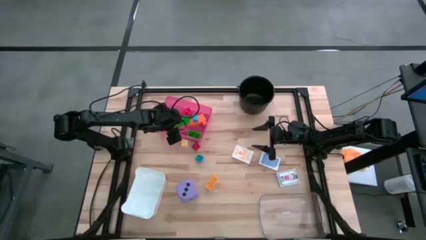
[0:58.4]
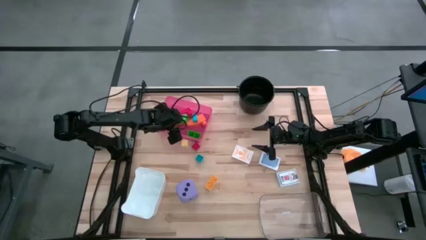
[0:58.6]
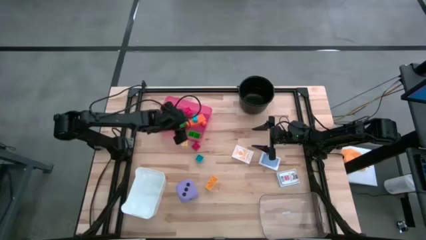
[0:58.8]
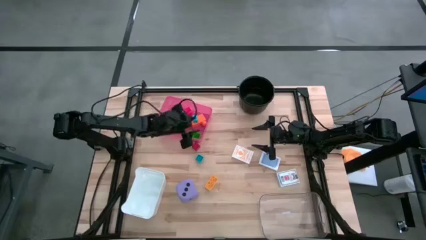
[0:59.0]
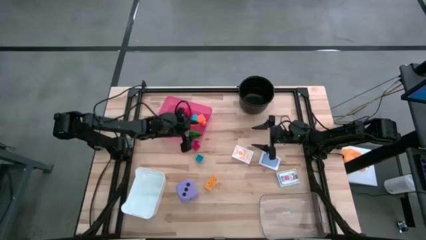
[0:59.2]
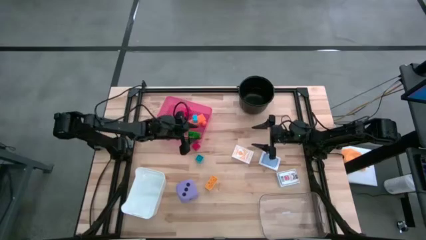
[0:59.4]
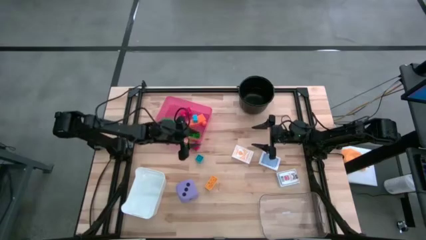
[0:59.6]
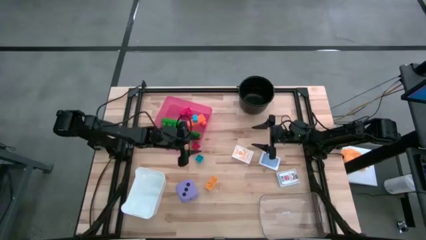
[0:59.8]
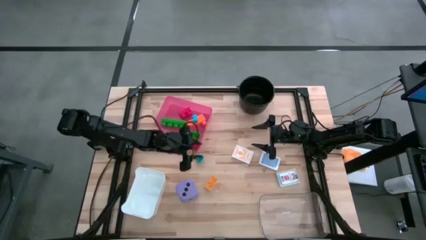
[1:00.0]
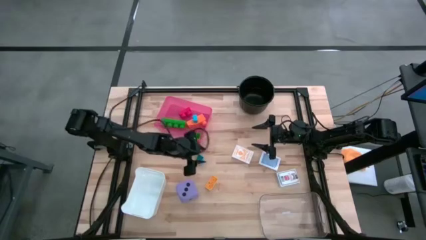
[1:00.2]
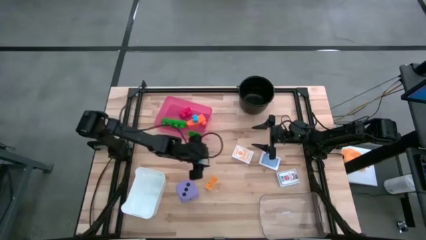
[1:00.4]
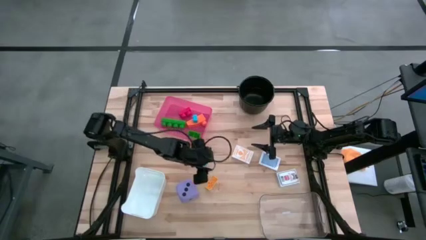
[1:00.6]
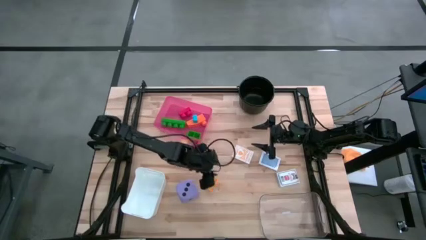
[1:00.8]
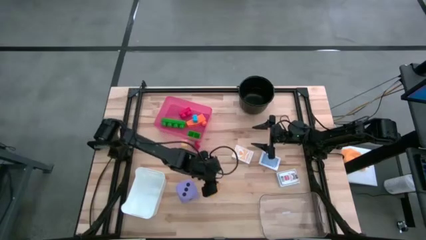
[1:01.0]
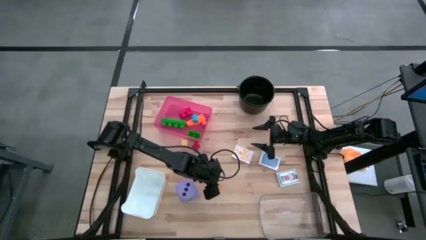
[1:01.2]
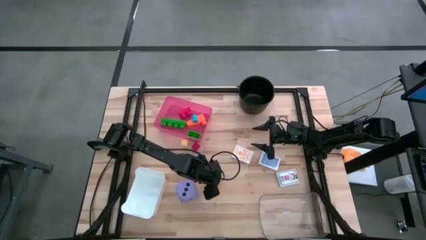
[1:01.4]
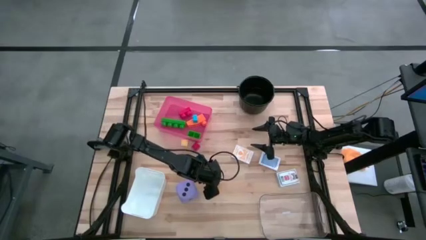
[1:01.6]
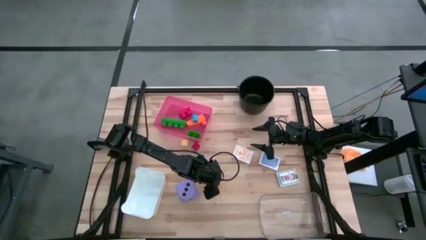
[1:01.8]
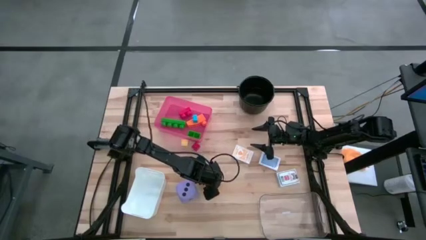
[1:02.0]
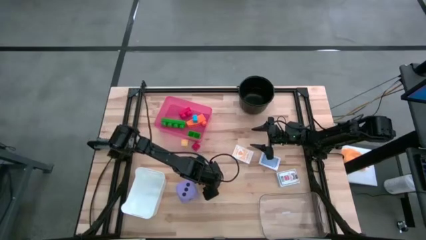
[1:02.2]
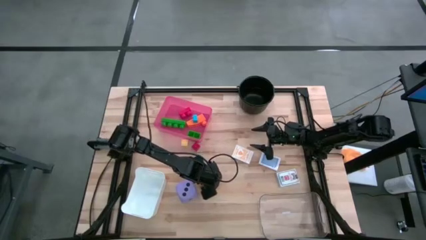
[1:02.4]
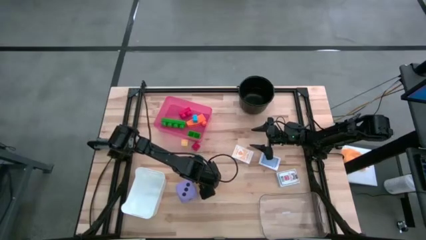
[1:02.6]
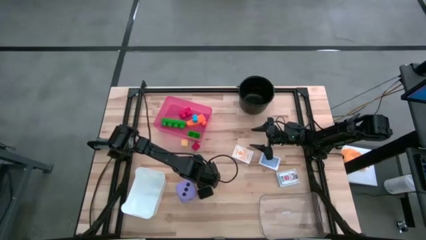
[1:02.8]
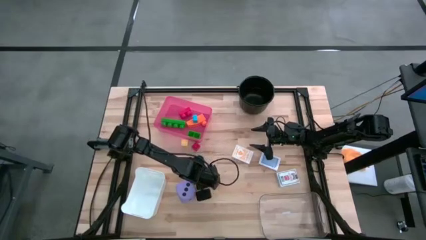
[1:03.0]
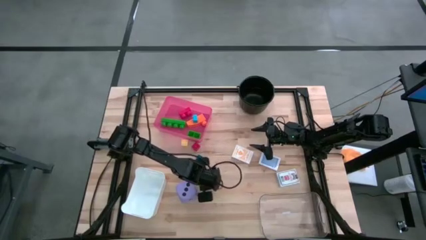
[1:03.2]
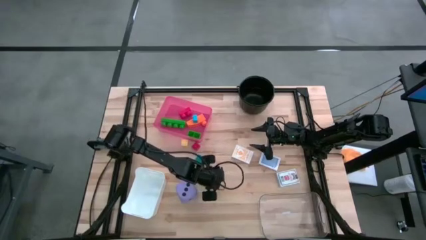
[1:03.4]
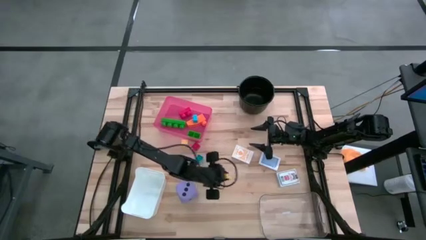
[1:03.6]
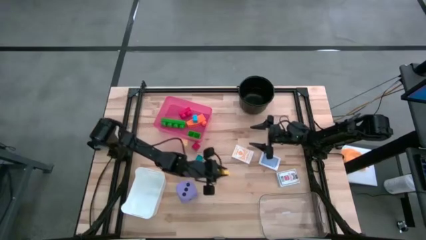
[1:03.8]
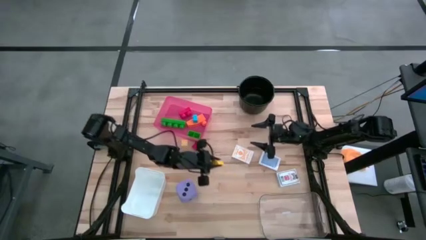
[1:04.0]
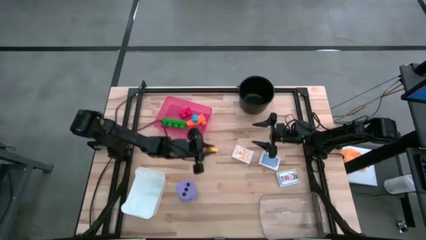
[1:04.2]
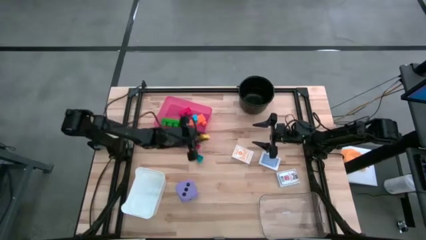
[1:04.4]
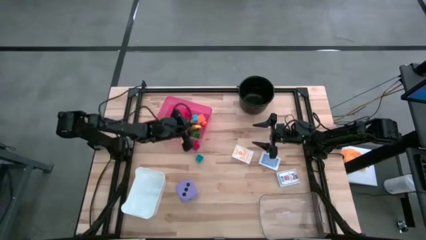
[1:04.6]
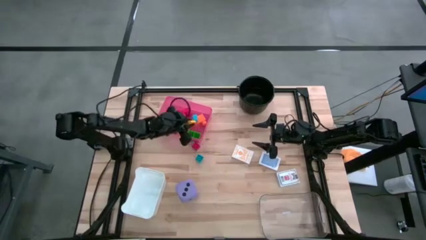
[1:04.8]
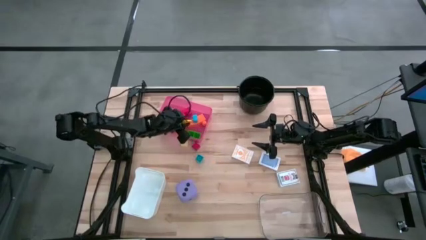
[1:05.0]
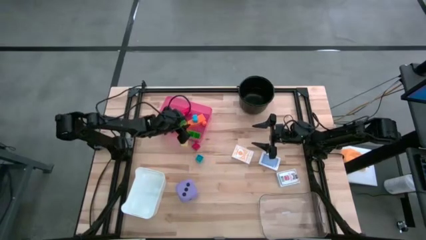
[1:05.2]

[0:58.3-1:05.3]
Task: Pick & Place Toys
Put the bottom yellow game piece into the red bin

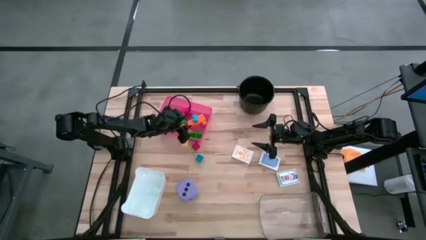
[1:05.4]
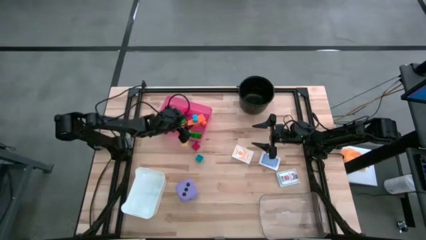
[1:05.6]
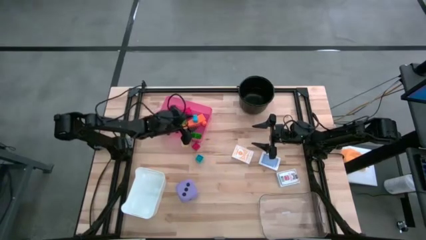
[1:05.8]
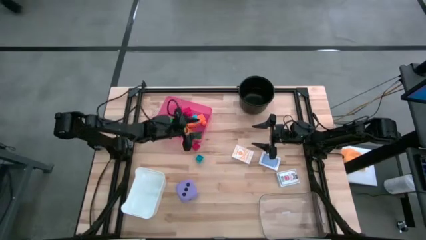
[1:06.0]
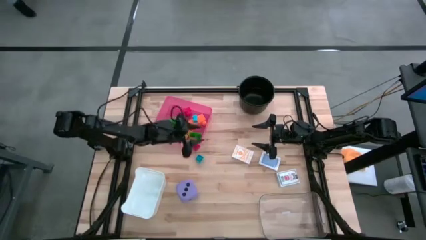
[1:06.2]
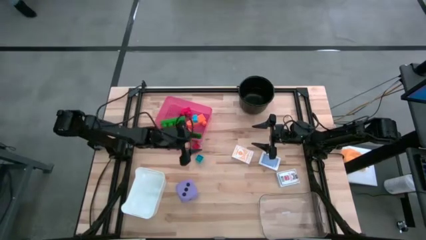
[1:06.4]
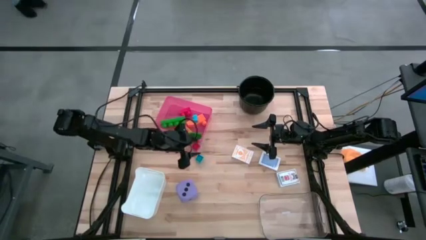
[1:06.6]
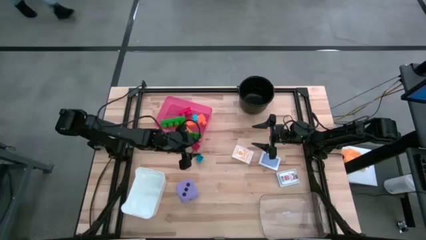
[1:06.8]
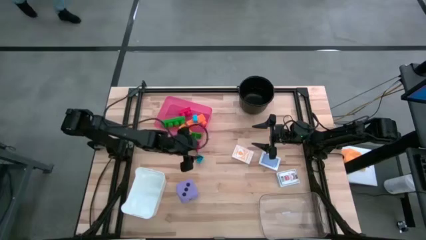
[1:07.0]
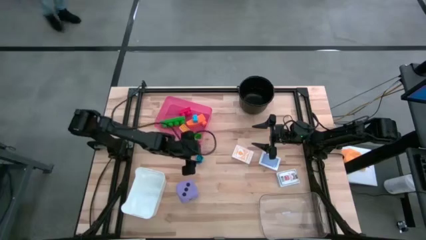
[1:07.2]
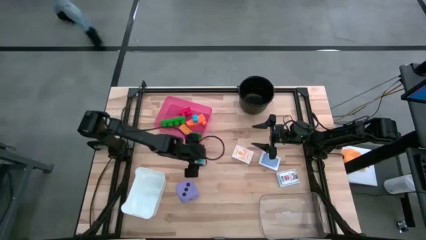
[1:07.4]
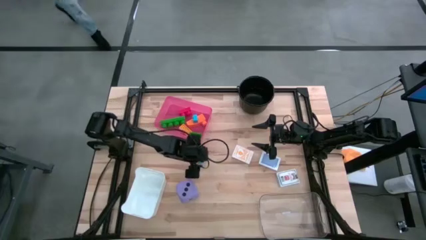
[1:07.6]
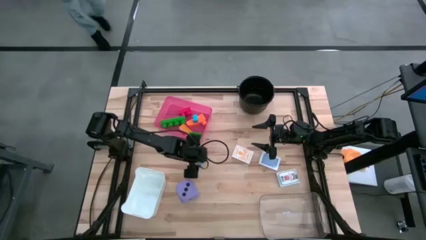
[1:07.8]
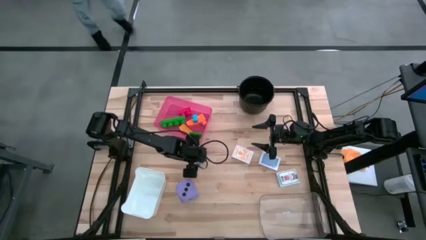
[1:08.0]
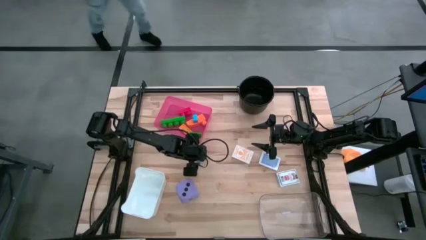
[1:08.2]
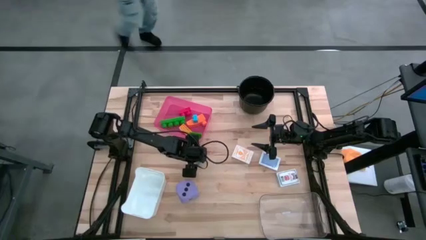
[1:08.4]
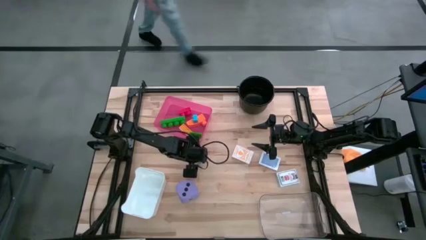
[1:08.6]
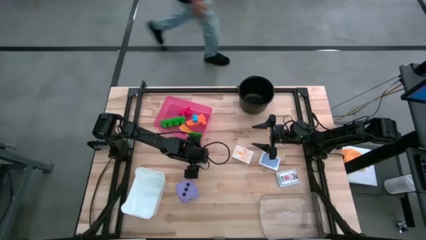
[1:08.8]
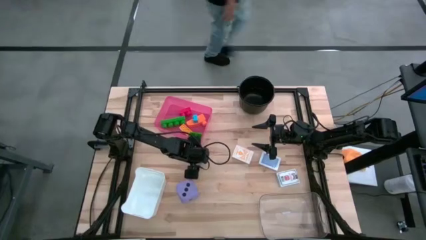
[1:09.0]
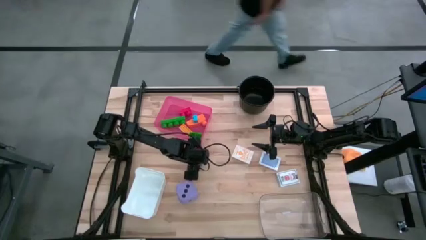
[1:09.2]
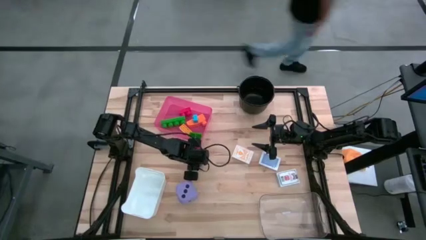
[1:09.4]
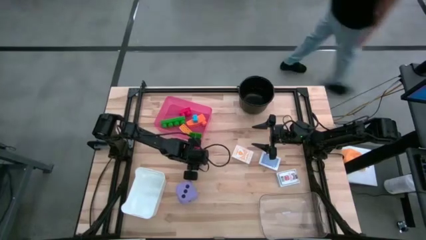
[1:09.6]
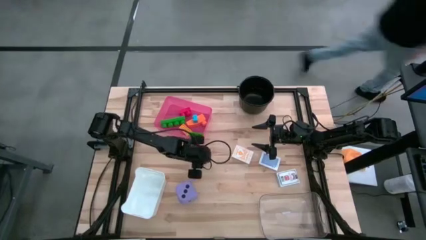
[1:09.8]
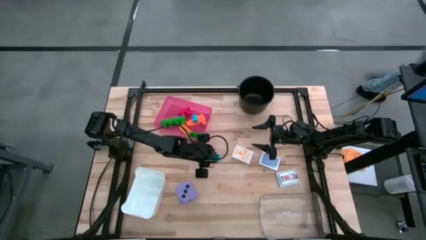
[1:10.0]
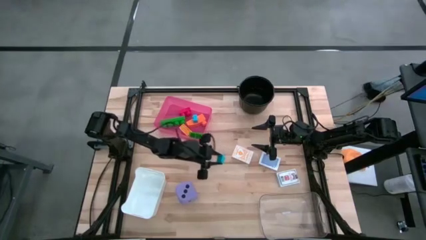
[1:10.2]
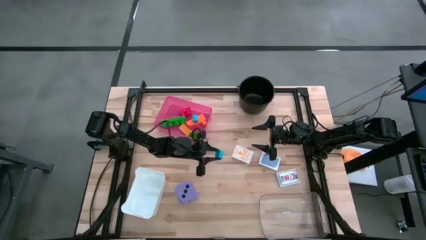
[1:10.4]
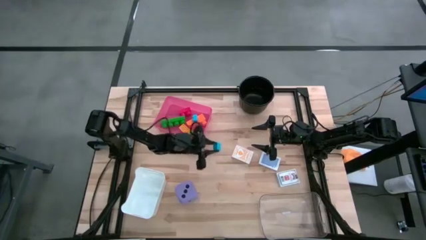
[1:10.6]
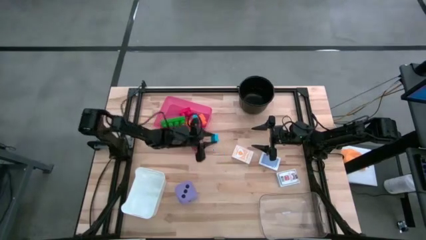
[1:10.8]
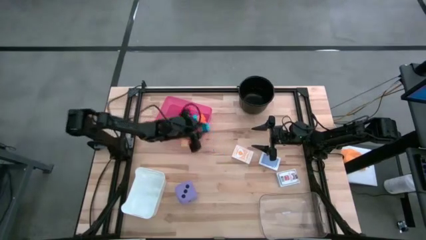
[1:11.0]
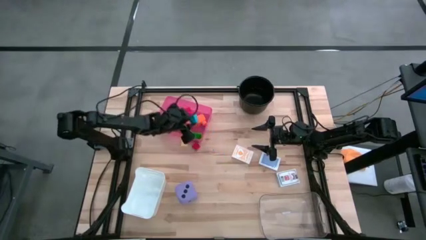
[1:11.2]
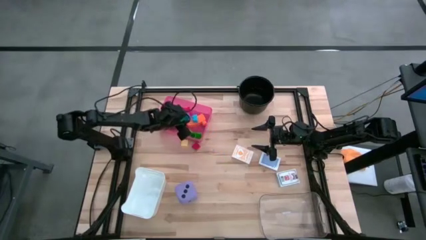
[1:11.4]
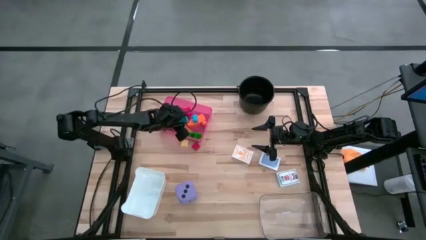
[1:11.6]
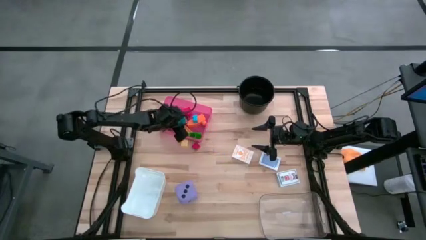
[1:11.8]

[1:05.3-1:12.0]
Put the blue game piece into the red bin

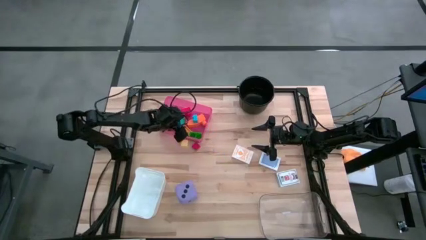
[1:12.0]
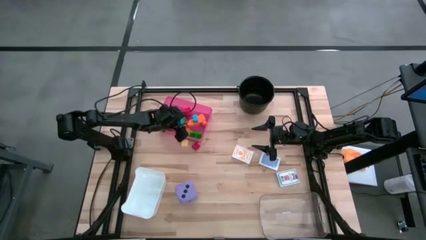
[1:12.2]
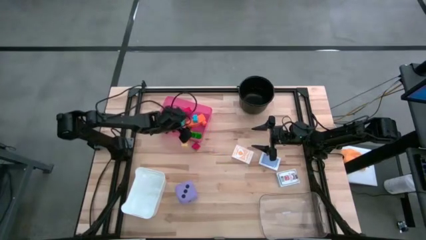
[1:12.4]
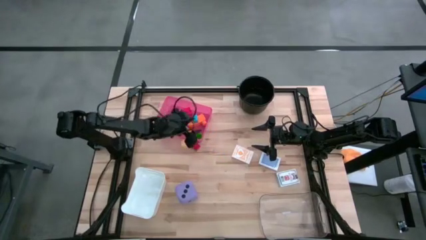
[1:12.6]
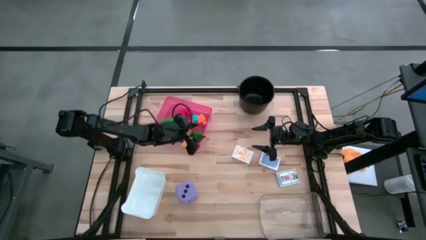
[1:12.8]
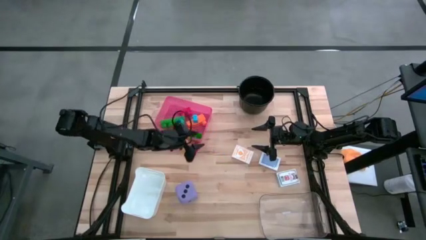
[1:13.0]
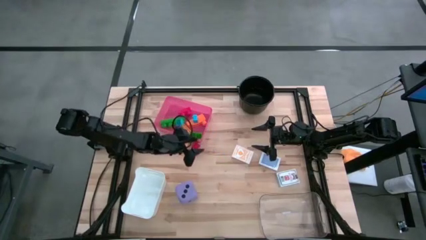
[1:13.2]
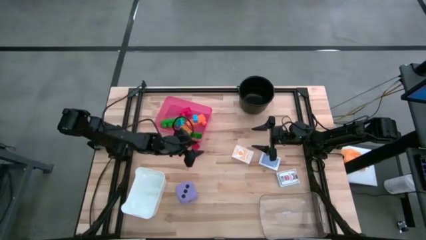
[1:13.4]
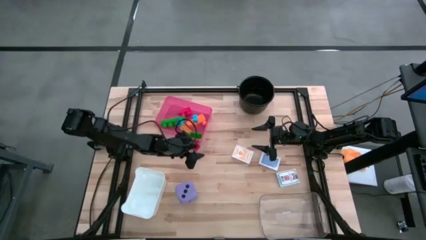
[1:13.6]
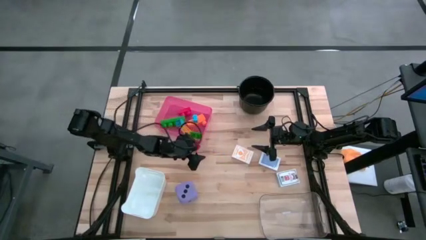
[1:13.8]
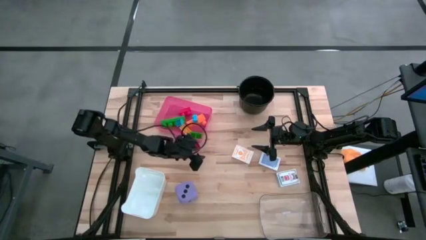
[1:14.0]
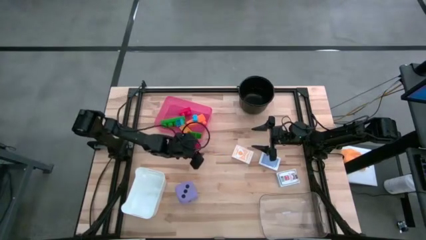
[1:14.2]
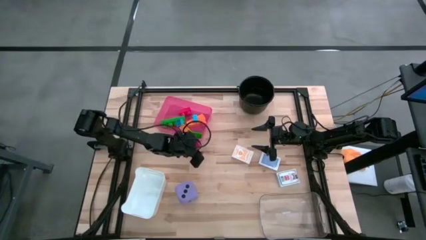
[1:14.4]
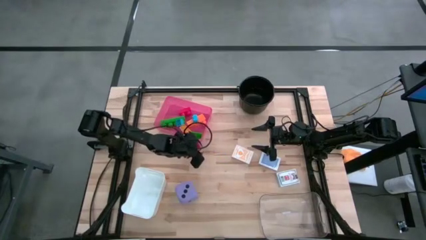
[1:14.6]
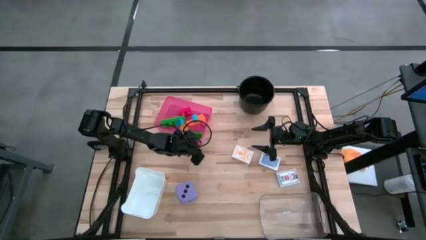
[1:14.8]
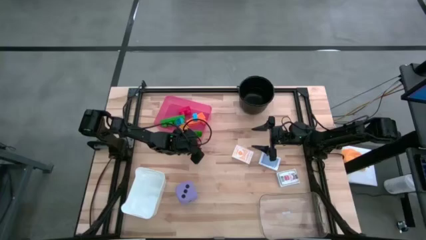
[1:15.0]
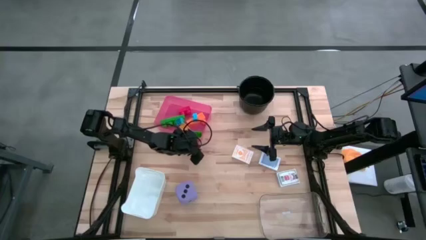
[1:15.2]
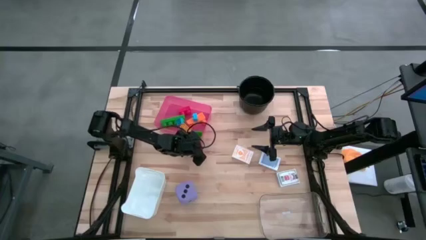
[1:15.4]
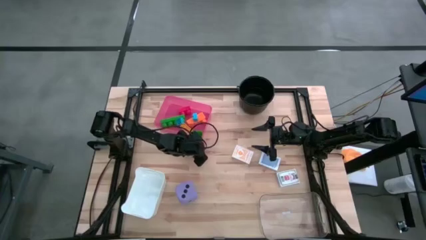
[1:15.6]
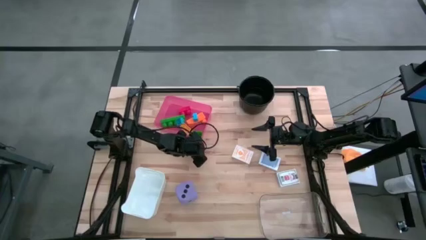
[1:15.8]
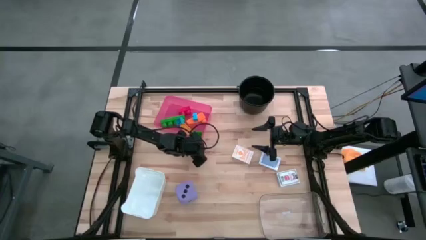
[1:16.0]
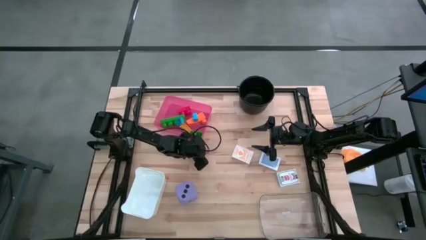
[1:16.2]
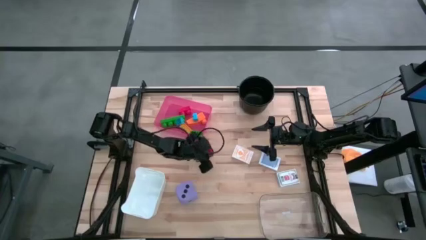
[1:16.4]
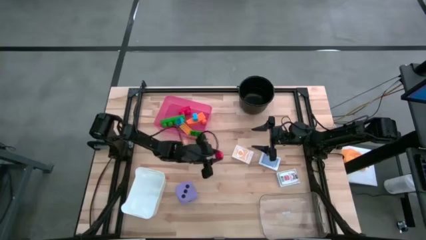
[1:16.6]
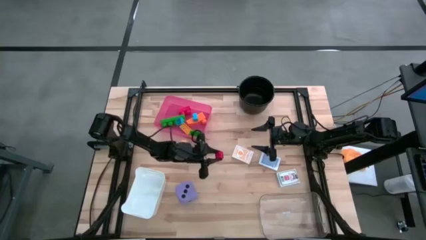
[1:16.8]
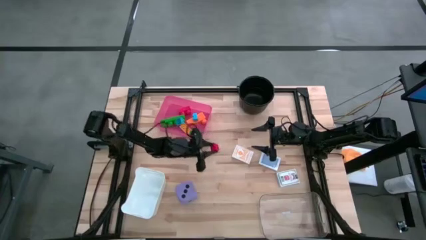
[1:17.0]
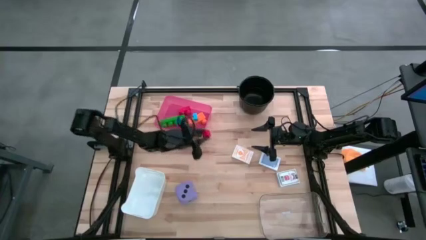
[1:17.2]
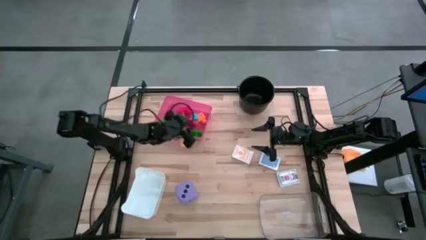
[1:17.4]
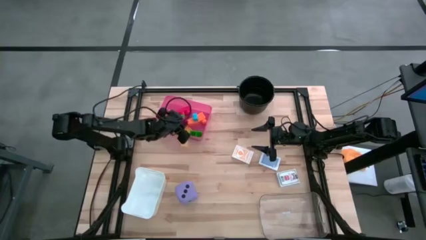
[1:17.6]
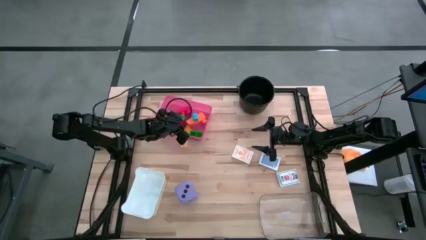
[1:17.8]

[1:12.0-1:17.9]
Put the red game piece into the red bin
